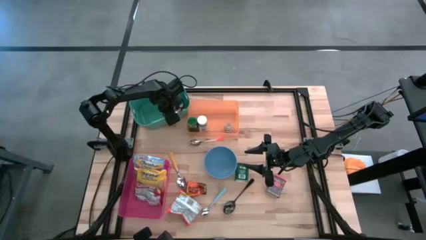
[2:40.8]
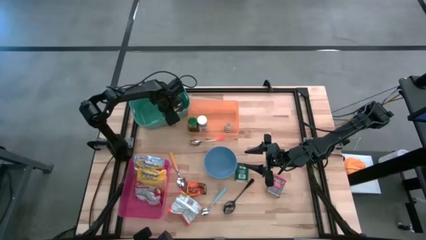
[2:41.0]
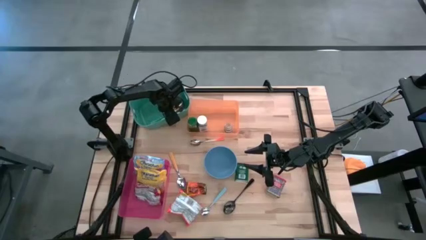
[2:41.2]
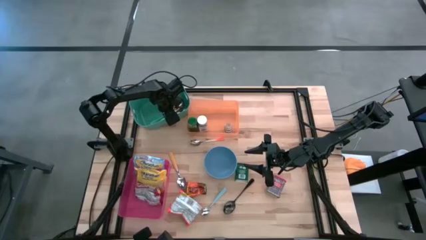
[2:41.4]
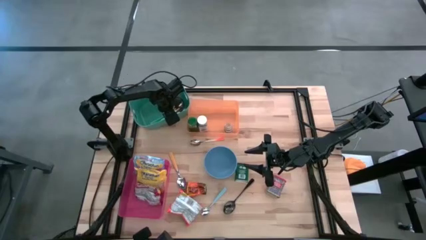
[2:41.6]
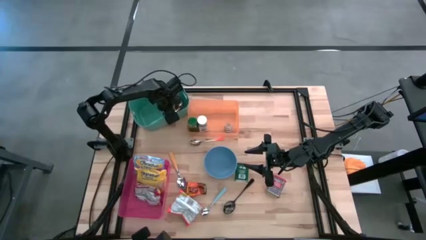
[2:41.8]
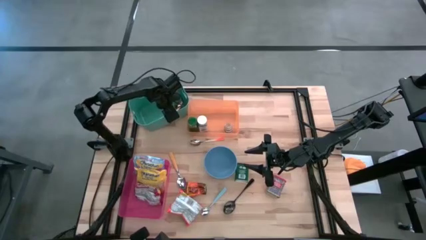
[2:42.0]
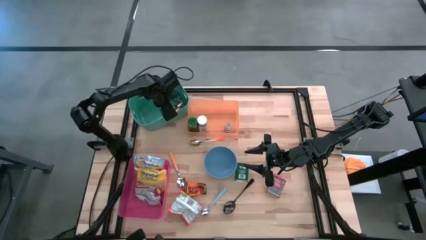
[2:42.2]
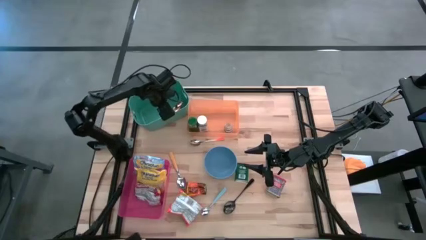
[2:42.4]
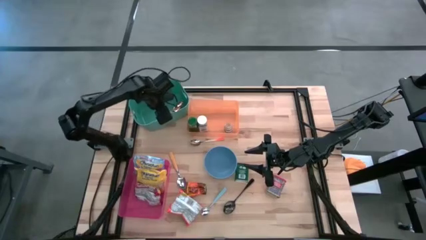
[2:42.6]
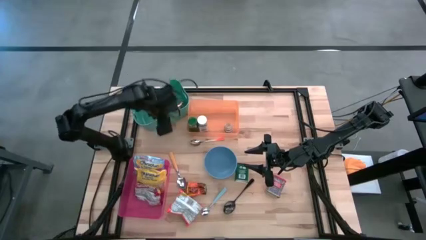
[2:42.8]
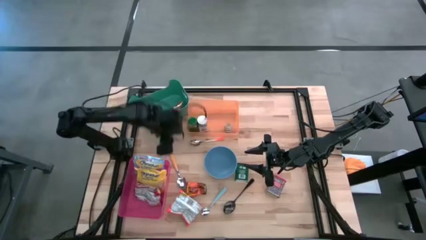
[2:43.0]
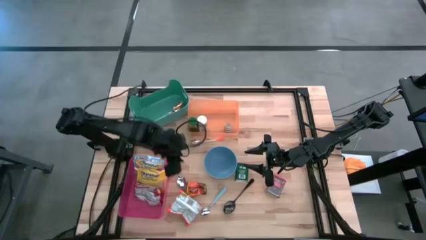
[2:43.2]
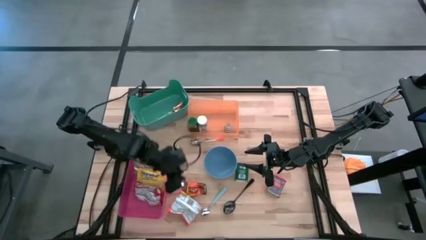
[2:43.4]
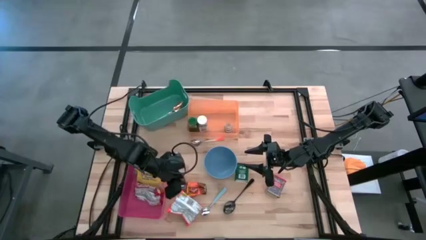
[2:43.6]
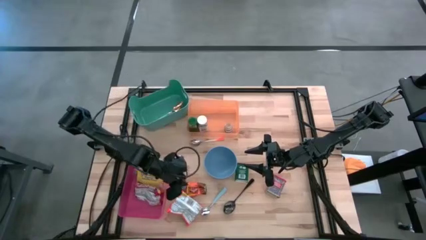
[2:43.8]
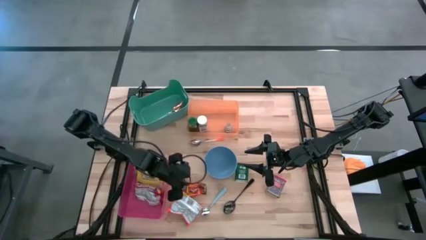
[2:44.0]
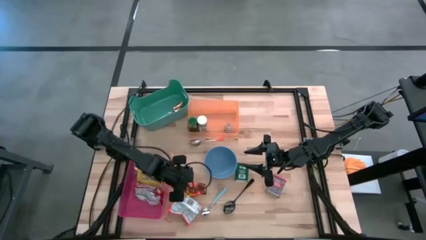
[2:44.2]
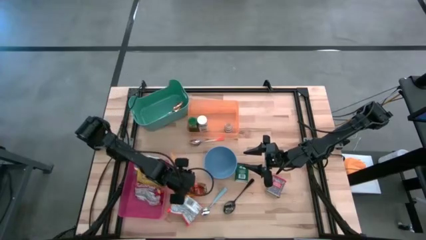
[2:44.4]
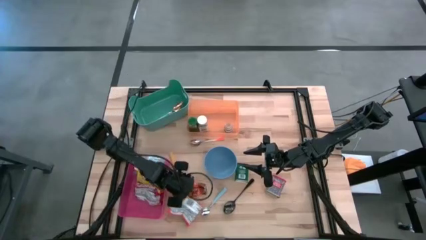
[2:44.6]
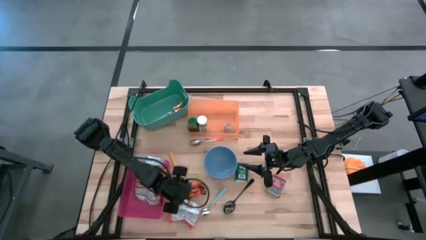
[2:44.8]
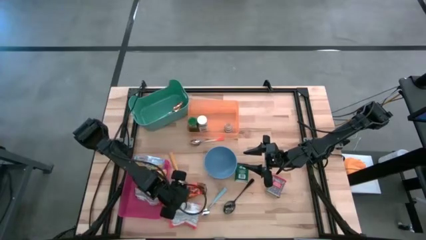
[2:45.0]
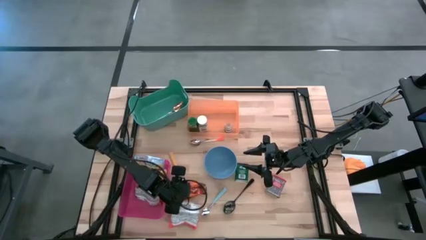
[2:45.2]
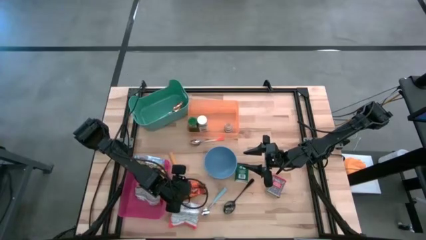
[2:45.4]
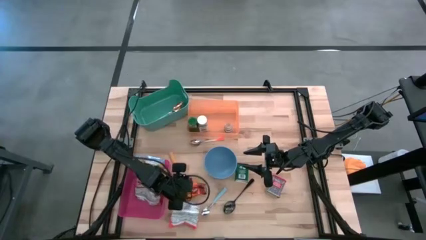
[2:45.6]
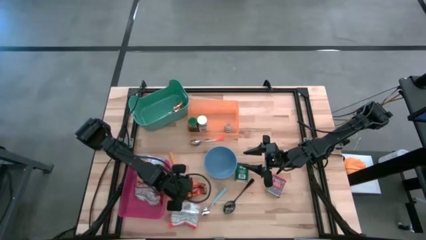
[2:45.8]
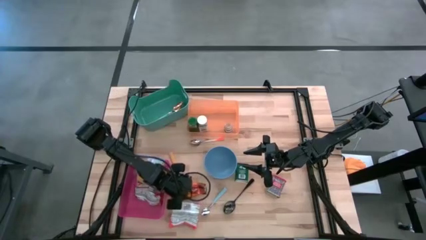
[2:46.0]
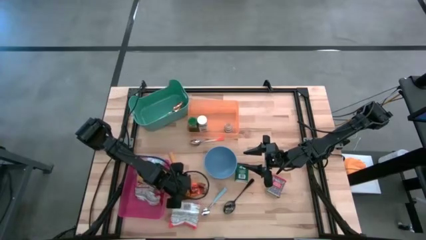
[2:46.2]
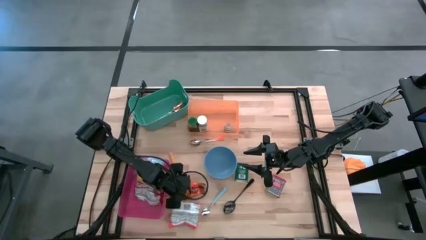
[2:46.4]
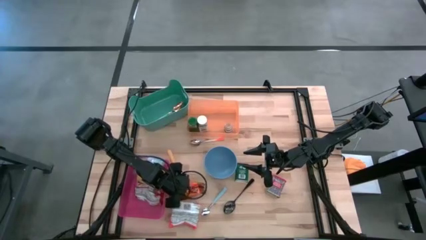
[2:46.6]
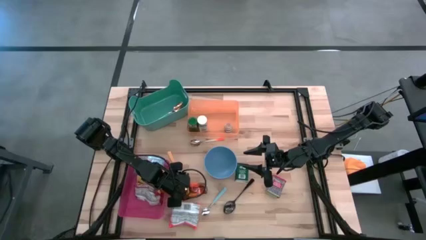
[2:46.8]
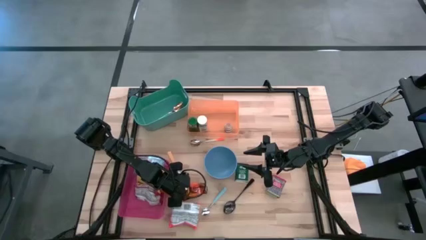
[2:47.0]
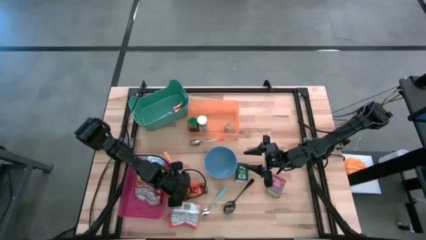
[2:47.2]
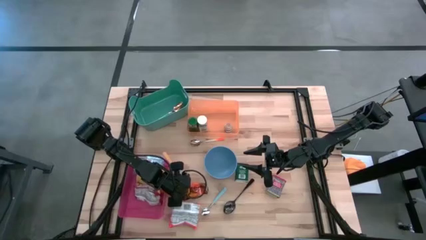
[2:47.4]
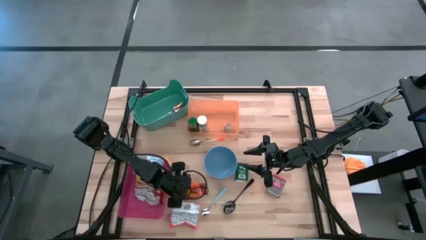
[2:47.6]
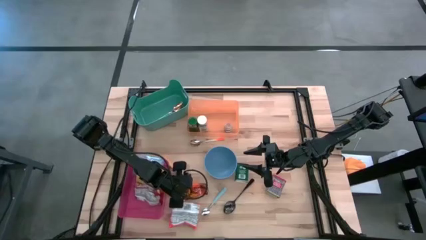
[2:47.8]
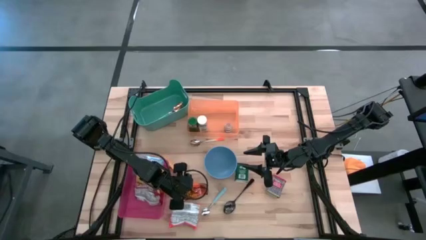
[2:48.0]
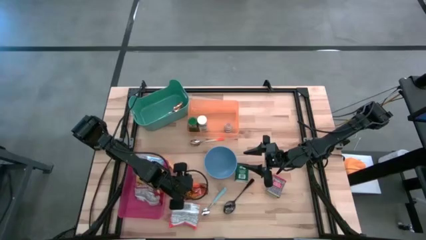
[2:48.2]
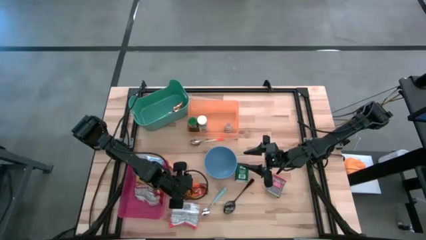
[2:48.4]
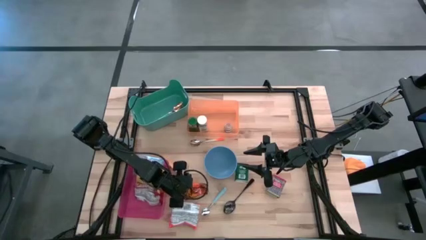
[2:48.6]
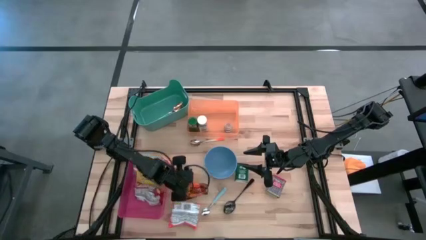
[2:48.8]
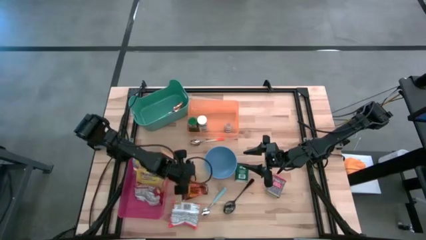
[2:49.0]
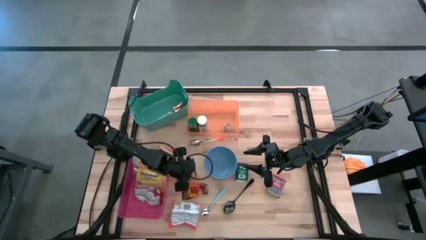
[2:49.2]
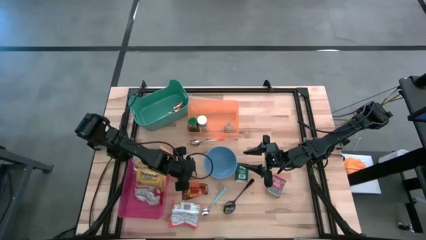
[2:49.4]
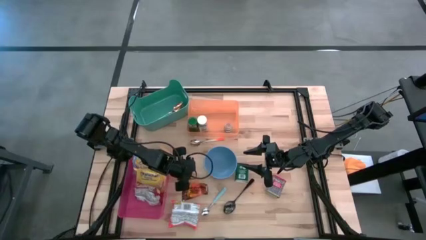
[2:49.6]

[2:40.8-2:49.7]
Adjust the orange spoon in the green bin
